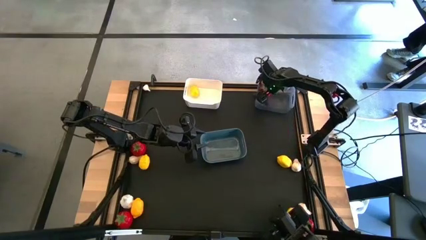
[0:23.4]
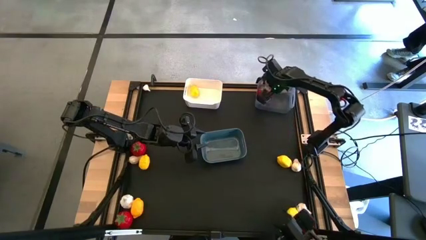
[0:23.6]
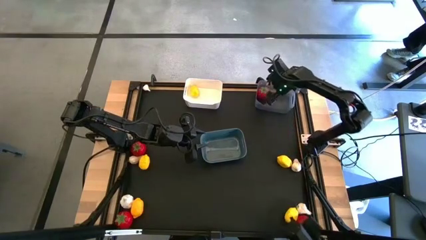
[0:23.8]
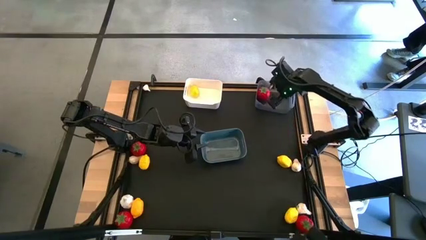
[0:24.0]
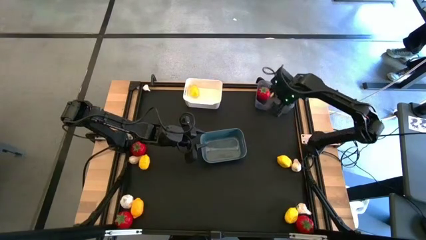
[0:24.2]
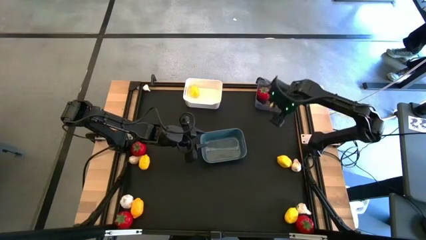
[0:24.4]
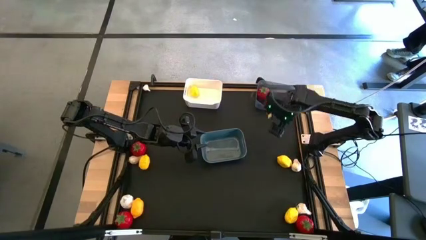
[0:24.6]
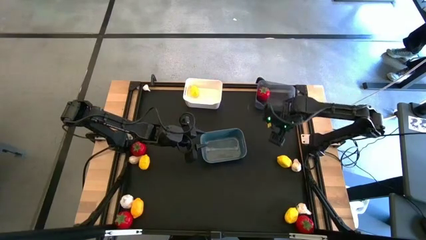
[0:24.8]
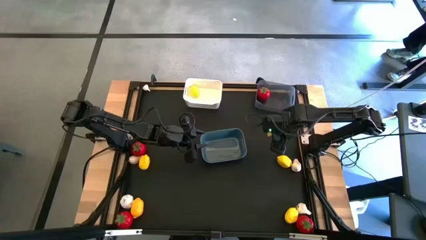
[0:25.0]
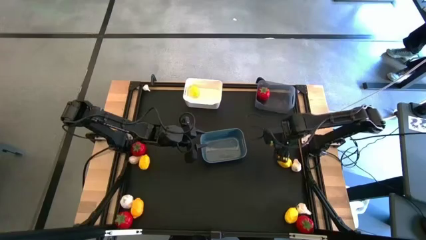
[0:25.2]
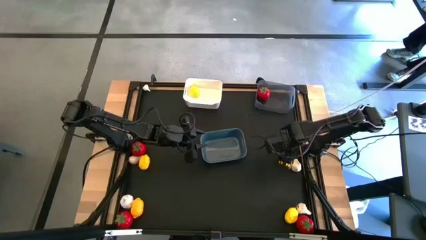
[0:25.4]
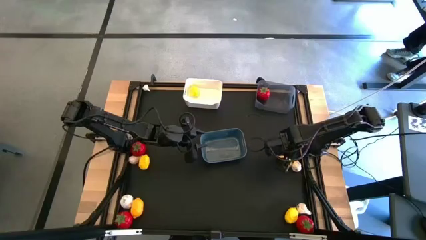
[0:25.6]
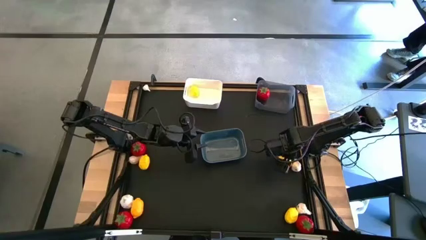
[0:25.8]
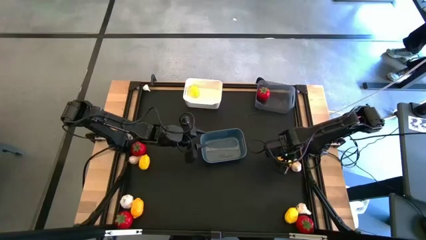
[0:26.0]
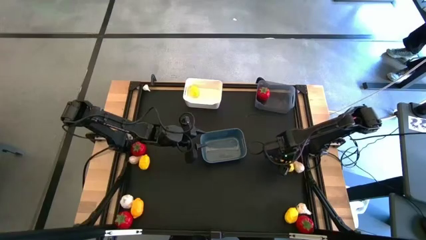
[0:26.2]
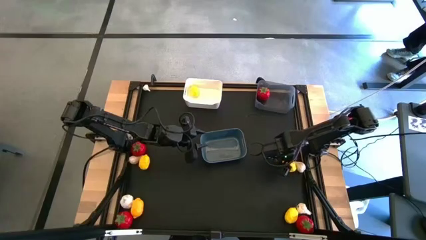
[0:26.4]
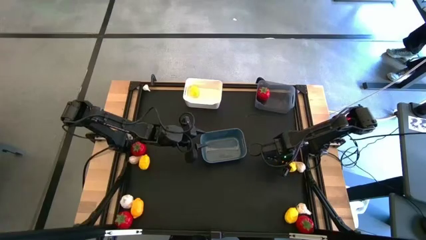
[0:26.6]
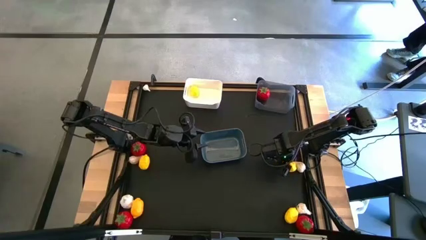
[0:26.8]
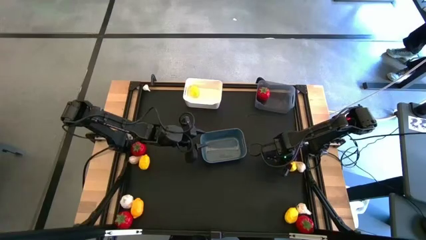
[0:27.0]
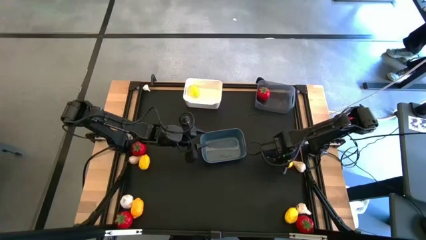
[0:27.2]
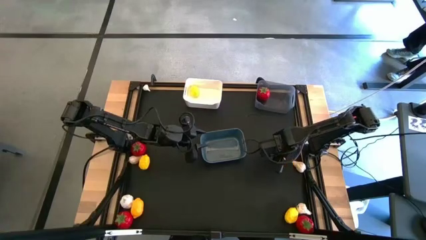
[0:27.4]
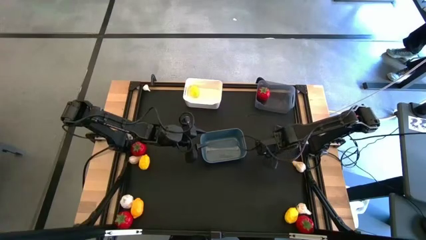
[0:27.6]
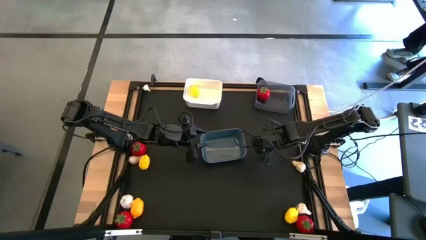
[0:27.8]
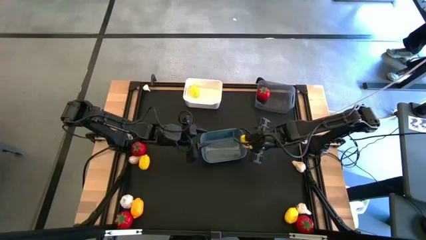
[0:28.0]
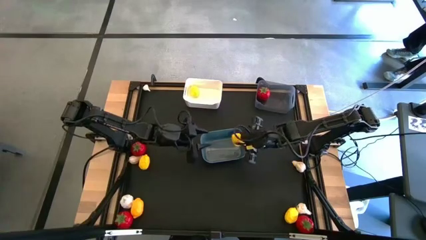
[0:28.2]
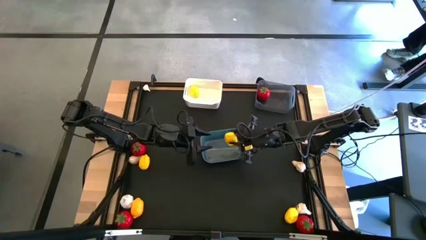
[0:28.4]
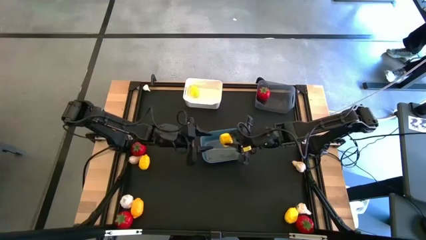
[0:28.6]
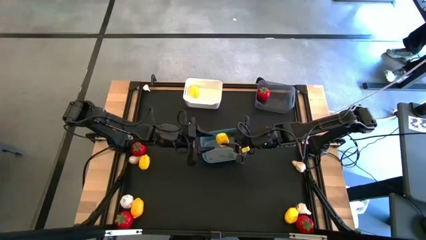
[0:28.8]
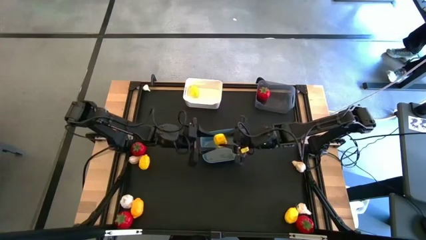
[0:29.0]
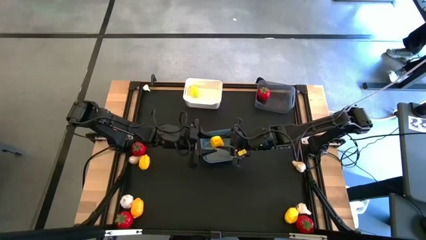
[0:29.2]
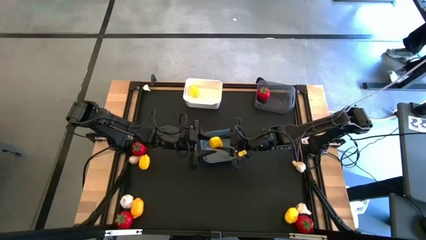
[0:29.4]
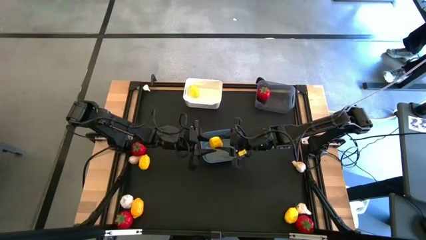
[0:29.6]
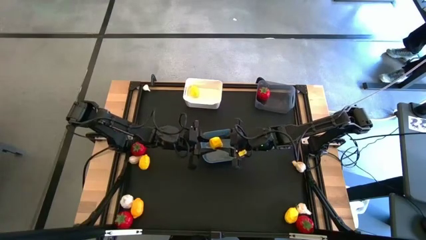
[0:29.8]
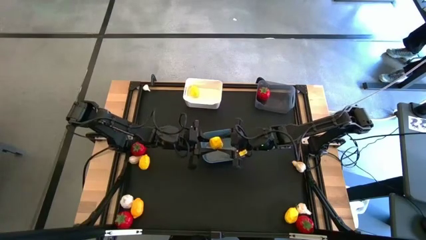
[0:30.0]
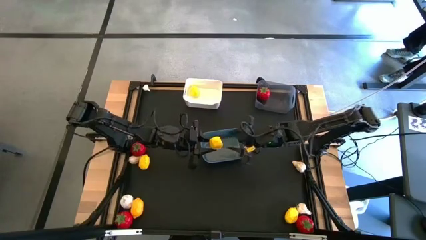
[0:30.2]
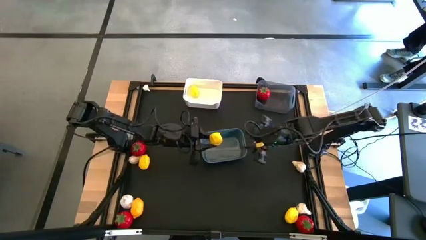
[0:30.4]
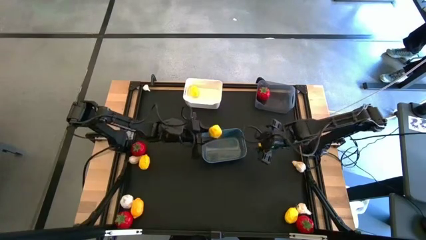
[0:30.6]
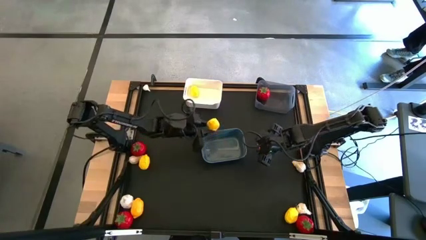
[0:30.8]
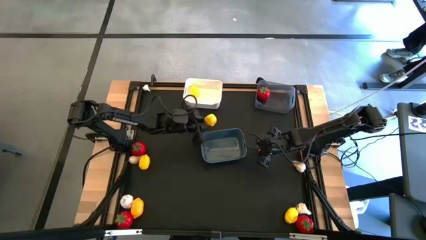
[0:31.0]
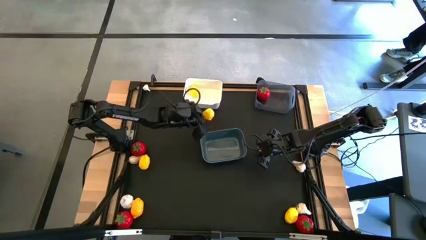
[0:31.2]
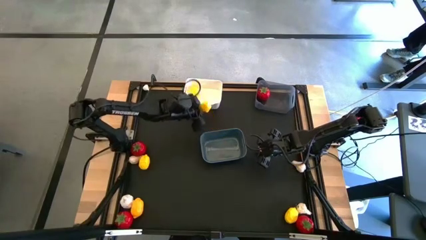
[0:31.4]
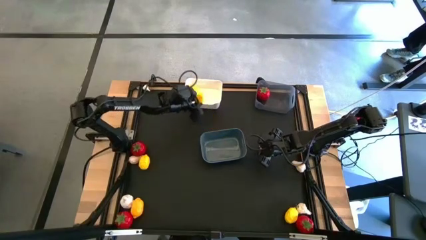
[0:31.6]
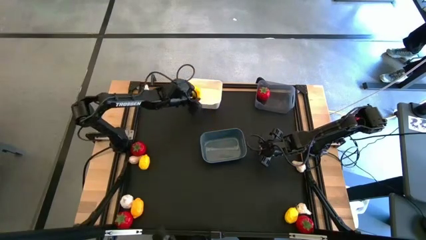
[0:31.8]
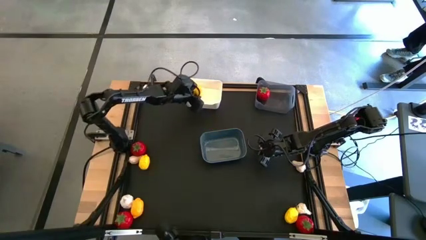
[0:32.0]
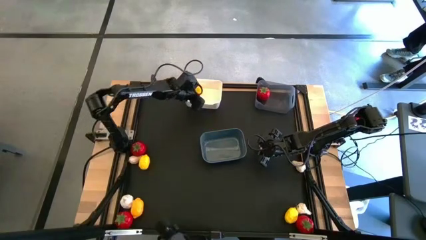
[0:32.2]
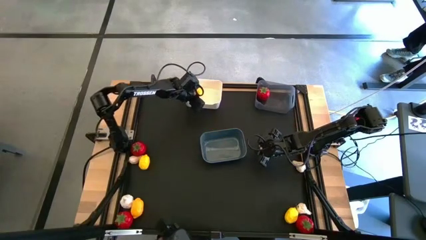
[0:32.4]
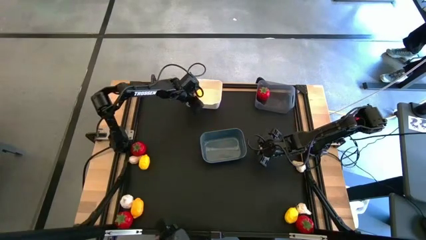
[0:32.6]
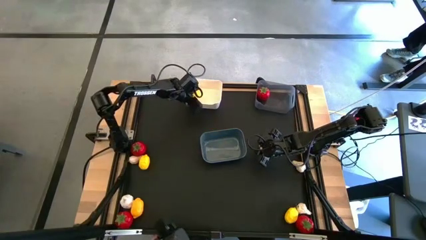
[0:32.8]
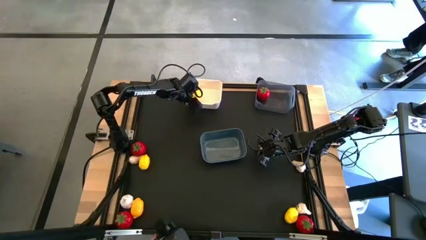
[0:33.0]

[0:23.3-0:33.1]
Task: Sort produce into baskets
Put the yellow lemon into the white bin
